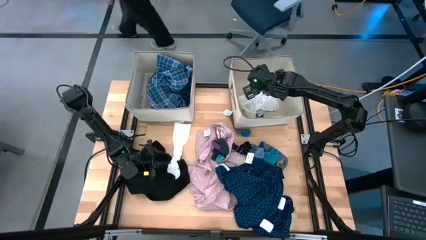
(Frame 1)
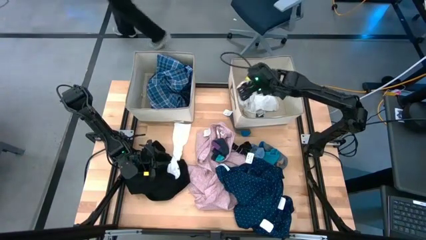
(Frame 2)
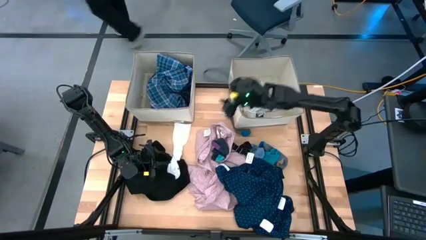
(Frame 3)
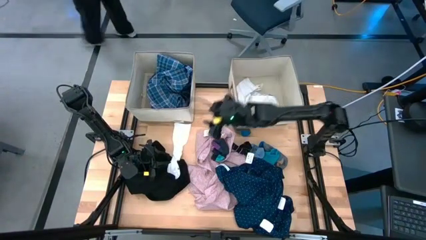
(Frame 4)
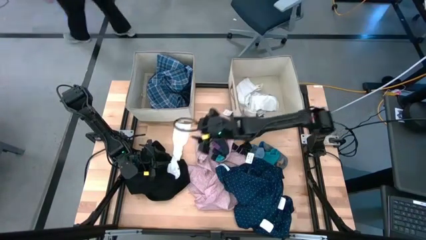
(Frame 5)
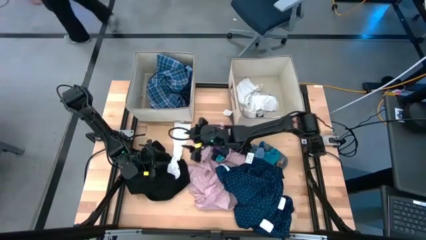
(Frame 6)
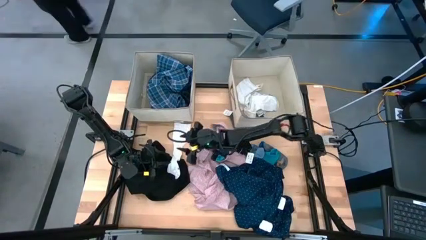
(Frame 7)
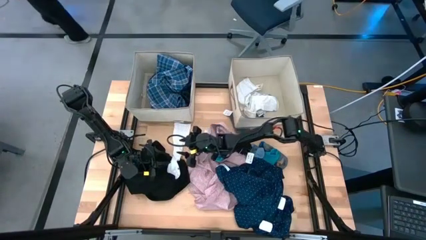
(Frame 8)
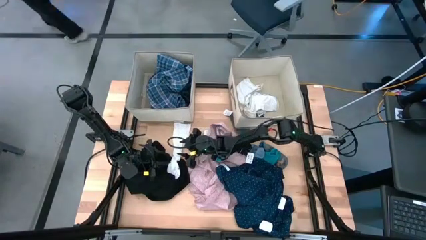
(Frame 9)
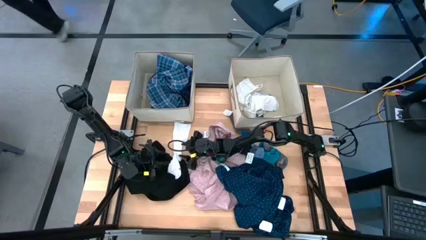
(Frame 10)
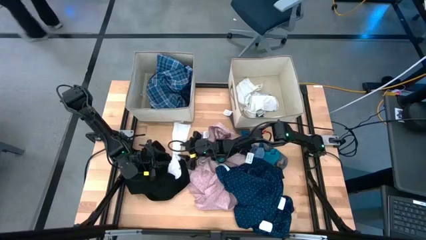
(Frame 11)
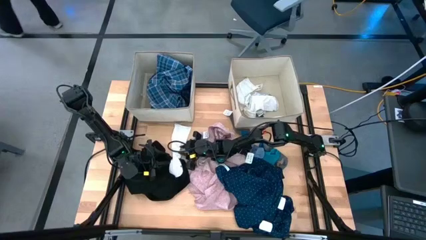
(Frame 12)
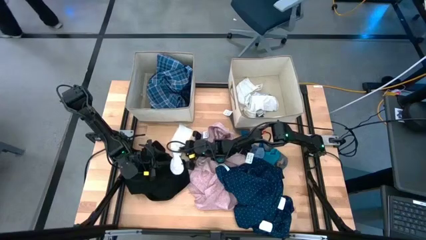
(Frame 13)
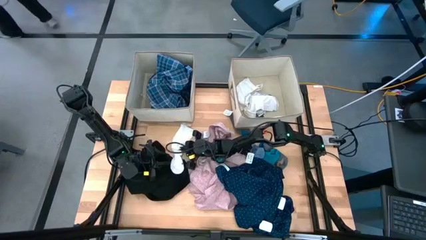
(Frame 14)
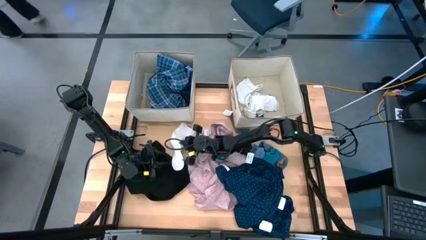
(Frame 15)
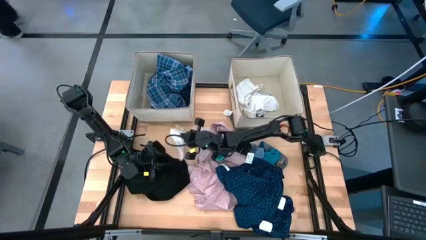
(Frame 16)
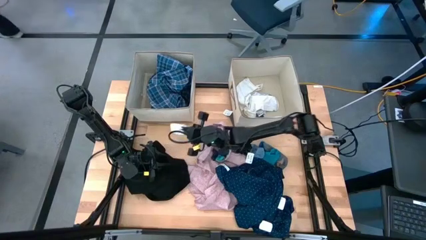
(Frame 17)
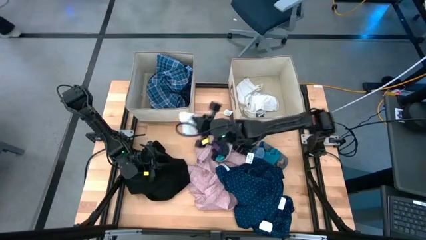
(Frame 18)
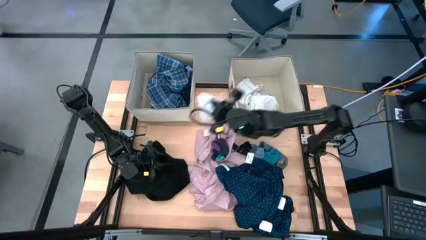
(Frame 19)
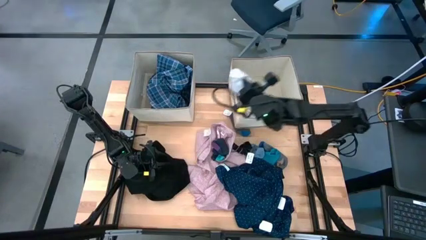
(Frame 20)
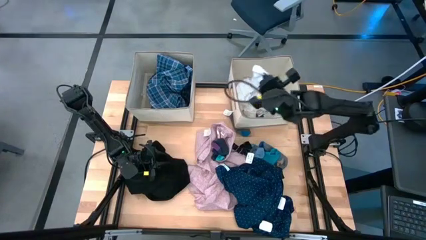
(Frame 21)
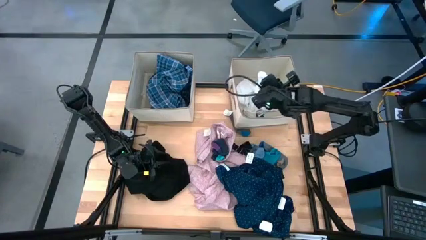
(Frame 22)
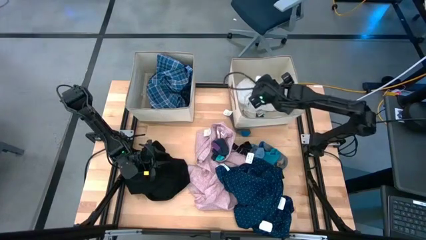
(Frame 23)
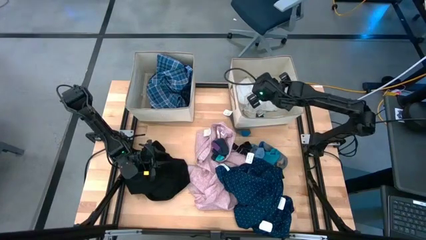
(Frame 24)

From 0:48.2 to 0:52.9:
Task: Sort clothes
Put the white sock into the right brown laundry organizer

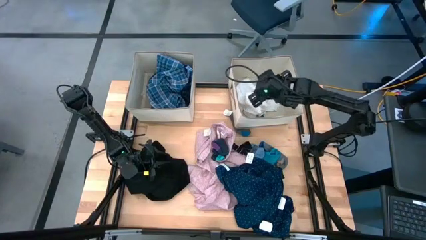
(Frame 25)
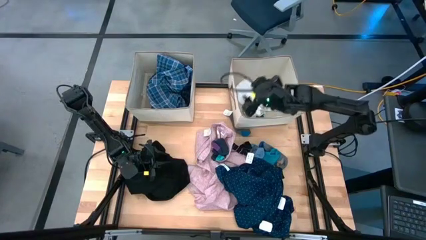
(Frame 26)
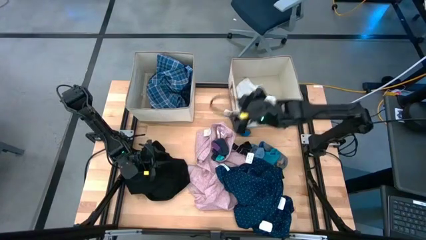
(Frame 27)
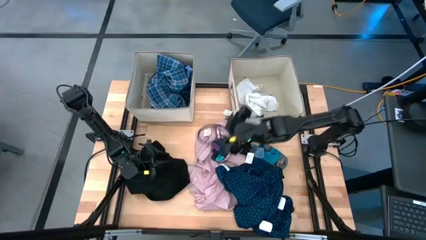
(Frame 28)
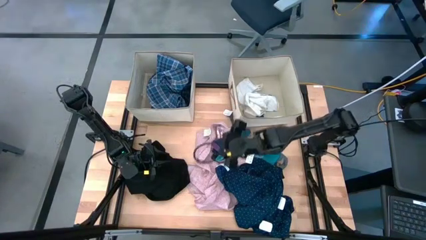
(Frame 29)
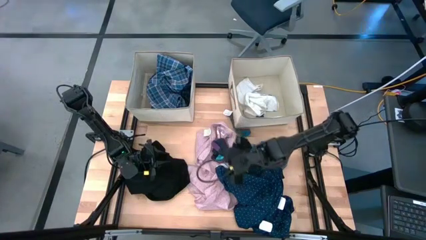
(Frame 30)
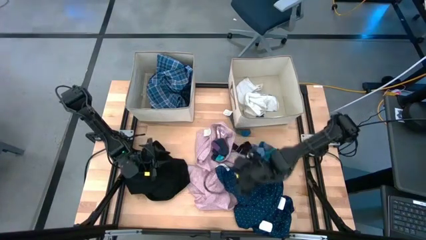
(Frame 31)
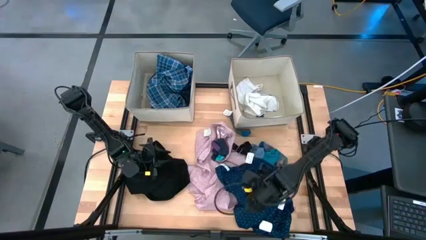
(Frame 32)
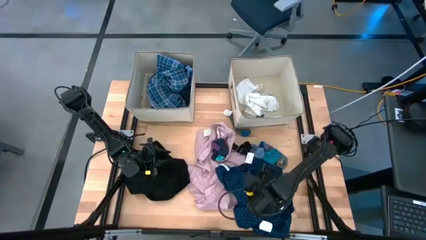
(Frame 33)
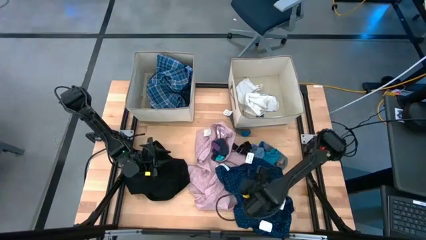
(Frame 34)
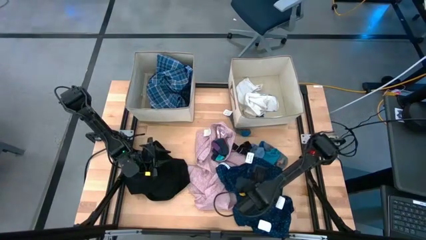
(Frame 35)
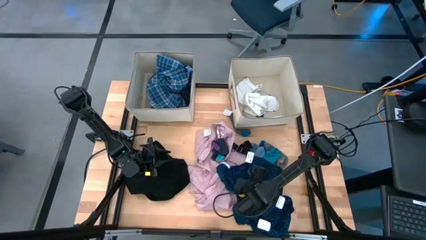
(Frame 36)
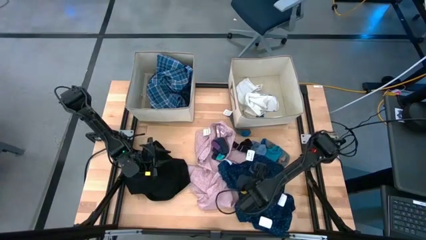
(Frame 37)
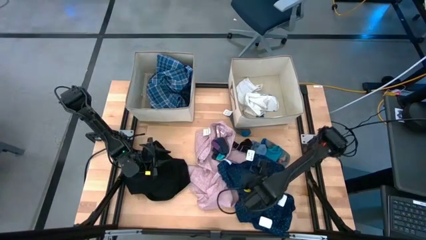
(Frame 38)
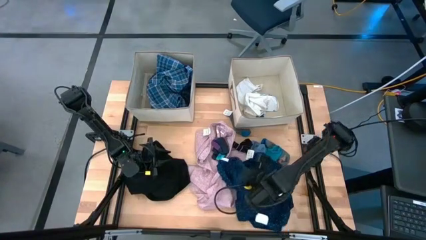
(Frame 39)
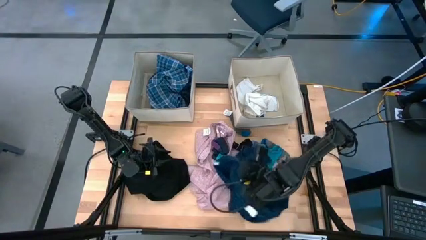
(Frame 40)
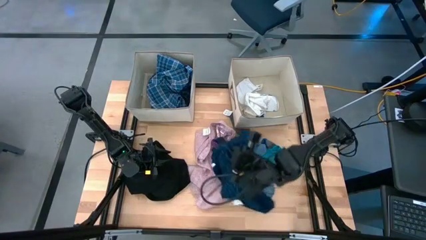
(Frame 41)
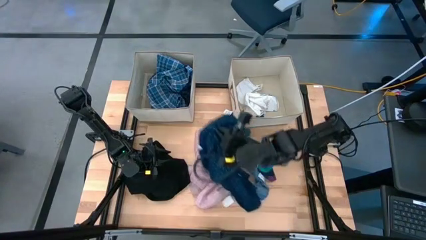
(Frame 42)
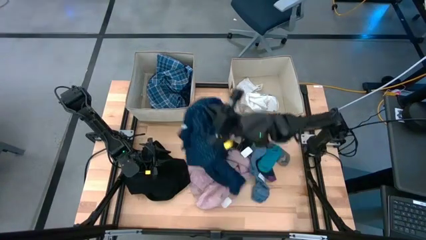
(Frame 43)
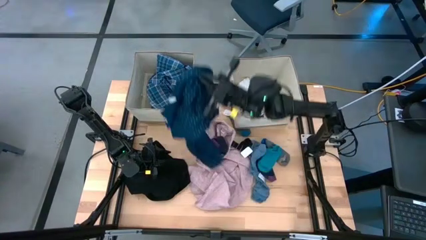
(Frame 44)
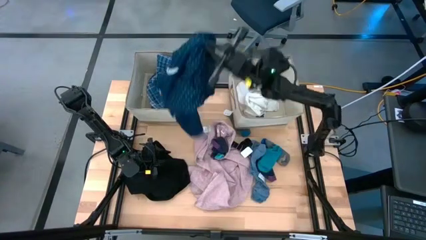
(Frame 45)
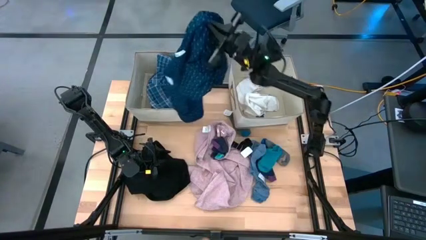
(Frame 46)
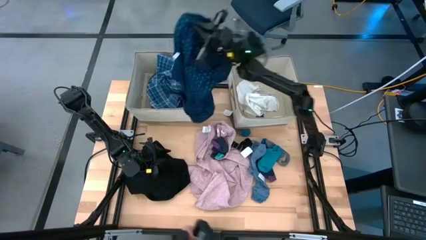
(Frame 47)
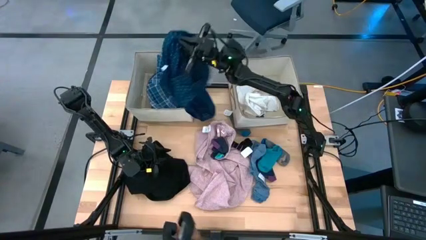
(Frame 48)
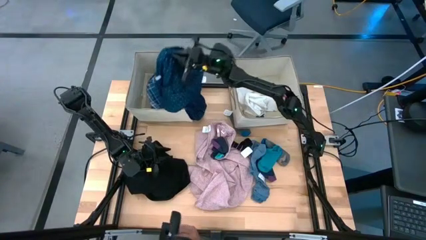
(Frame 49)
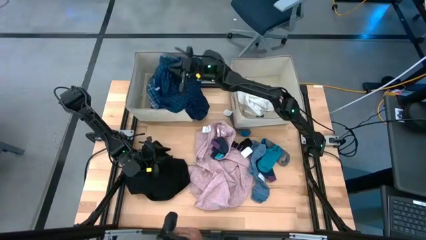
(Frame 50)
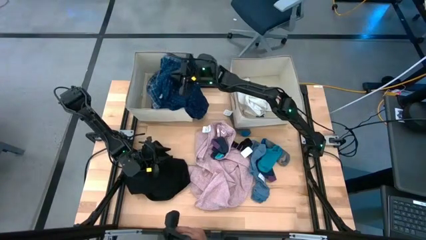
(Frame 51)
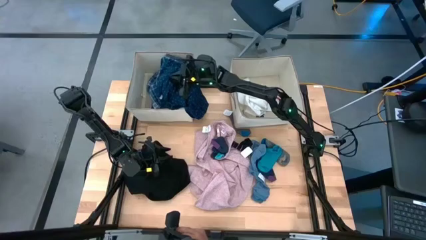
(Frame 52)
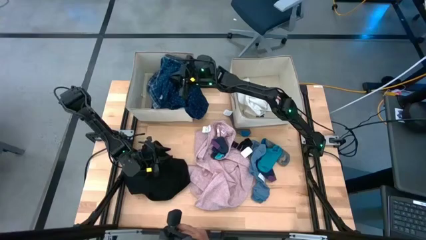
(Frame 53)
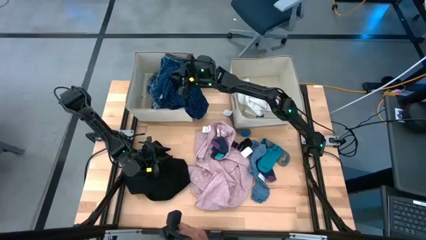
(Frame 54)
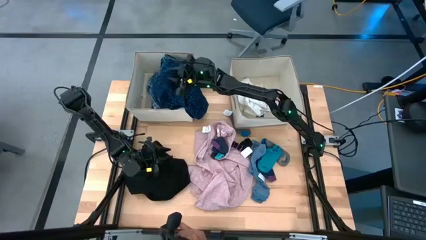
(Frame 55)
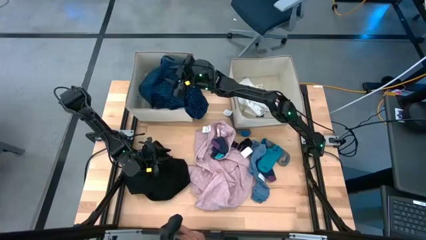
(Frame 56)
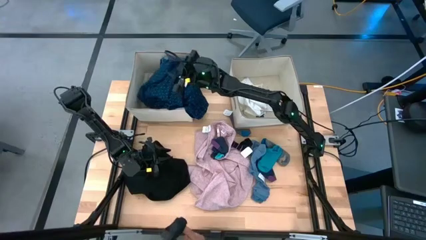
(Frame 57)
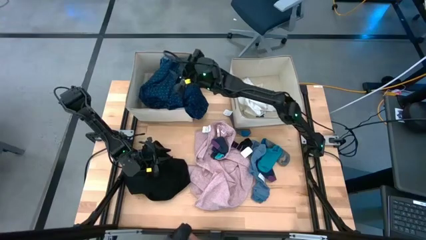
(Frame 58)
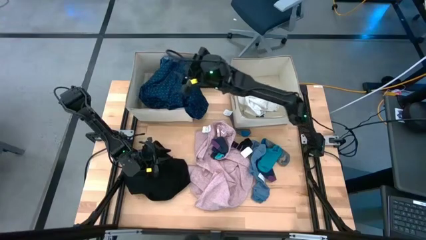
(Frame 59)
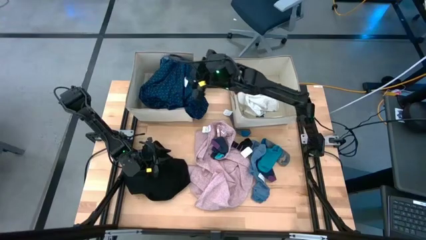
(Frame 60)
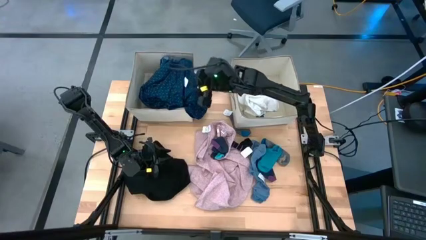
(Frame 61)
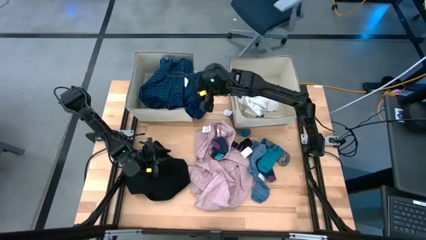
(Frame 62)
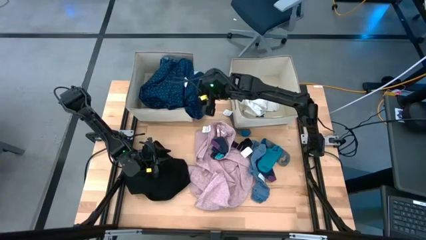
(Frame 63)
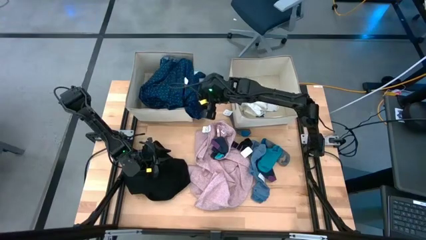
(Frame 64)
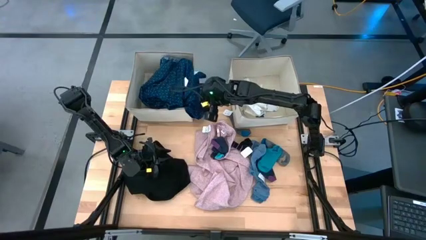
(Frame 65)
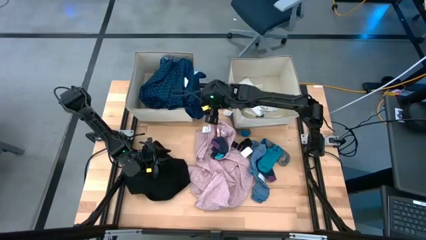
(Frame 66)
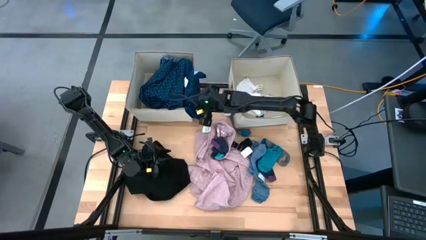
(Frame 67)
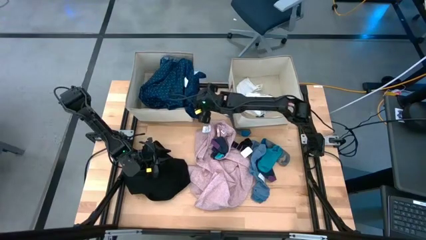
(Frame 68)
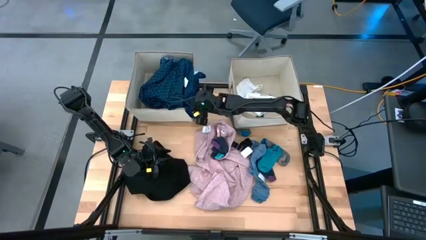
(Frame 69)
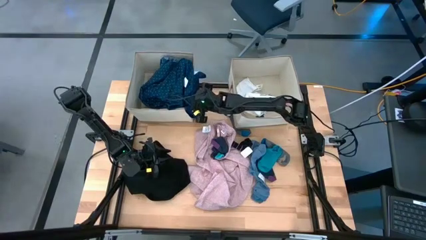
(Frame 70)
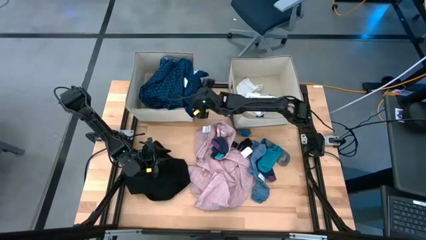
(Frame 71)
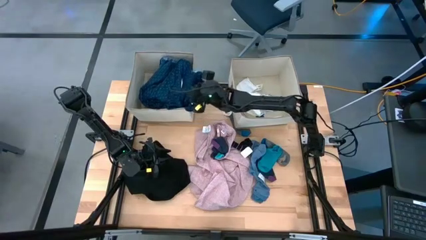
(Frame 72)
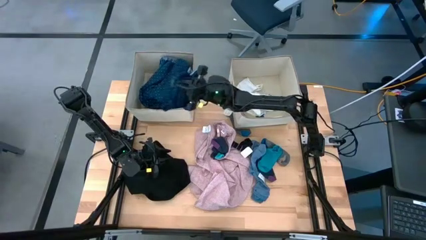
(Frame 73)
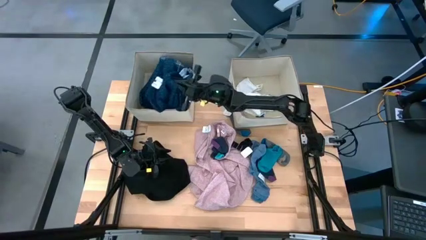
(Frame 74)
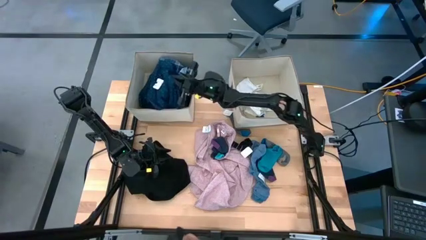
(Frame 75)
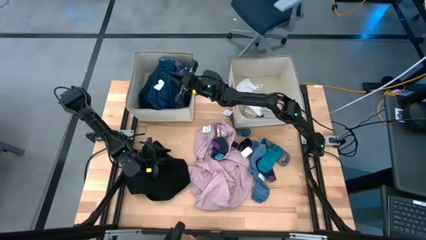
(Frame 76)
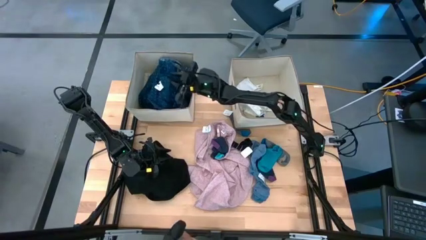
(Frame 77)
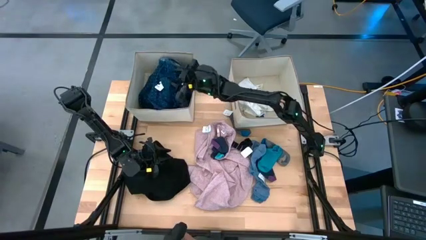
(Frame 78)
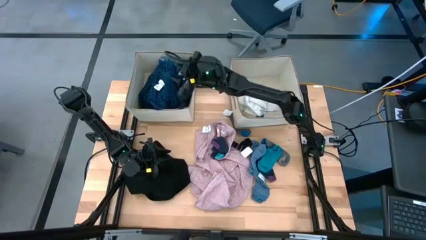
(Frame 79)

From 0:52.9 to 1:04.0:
Put the blue patient gown into the left brown laundry organizer
